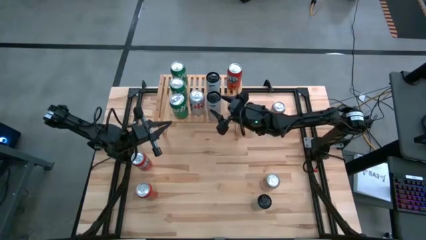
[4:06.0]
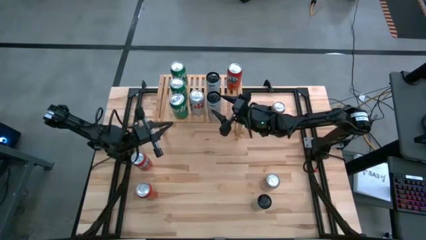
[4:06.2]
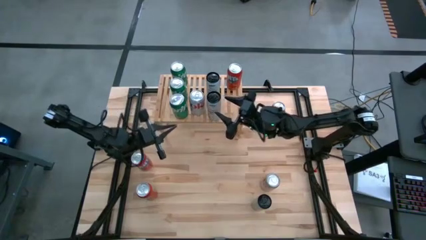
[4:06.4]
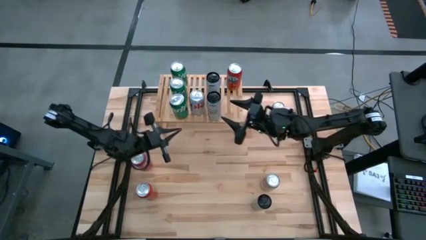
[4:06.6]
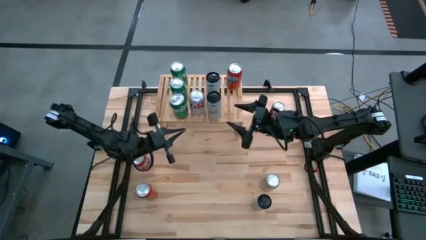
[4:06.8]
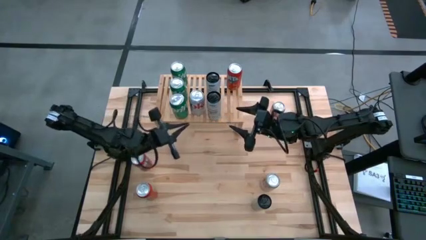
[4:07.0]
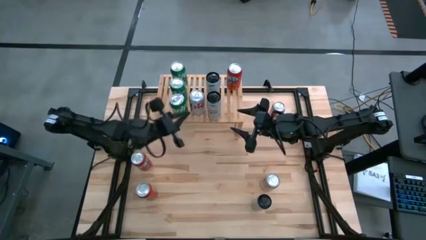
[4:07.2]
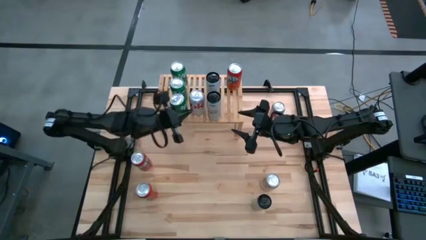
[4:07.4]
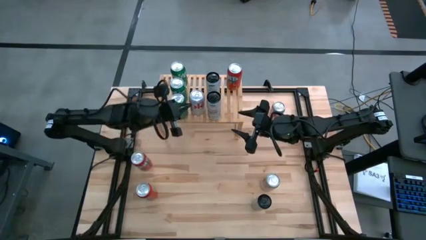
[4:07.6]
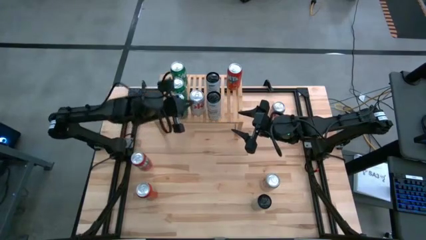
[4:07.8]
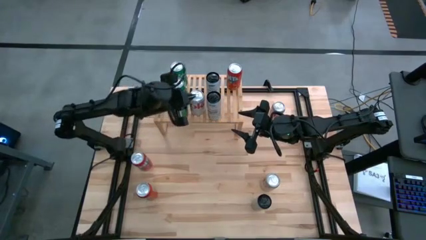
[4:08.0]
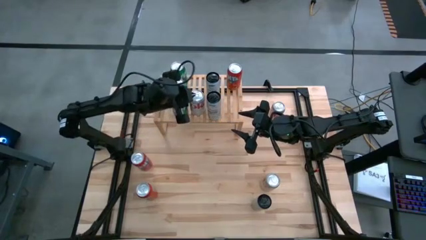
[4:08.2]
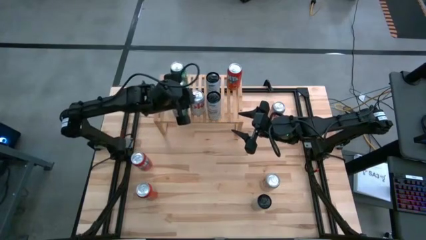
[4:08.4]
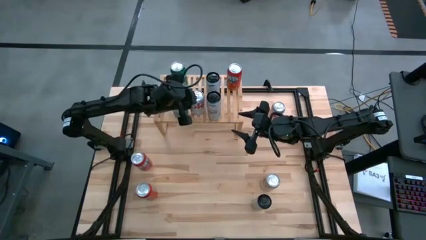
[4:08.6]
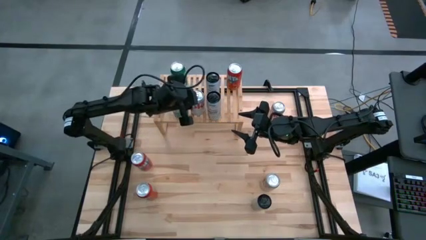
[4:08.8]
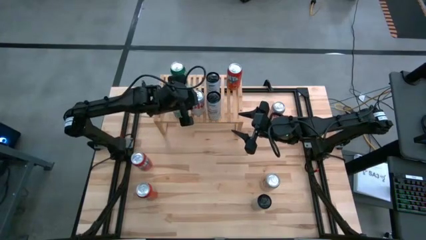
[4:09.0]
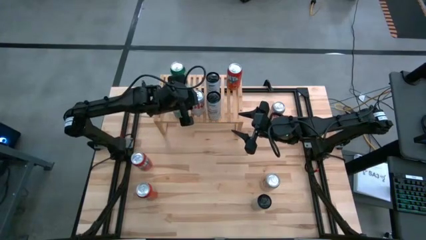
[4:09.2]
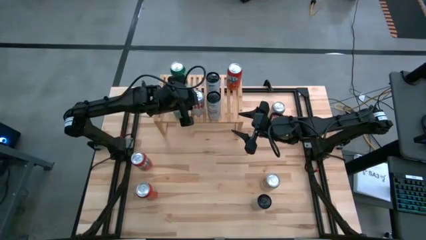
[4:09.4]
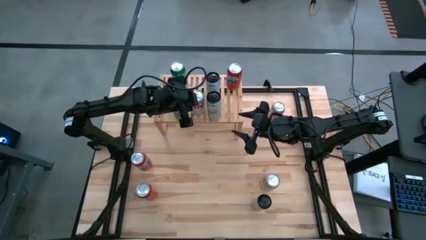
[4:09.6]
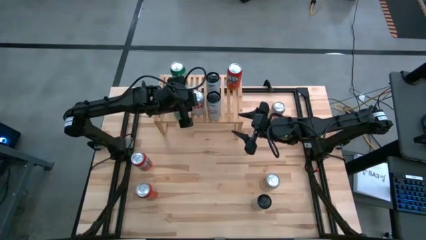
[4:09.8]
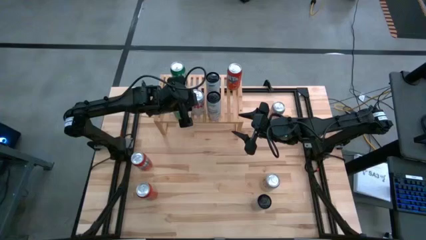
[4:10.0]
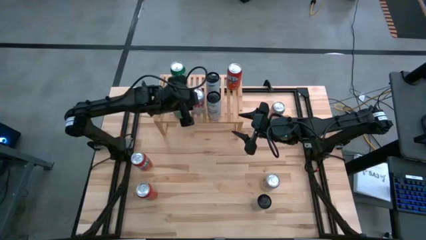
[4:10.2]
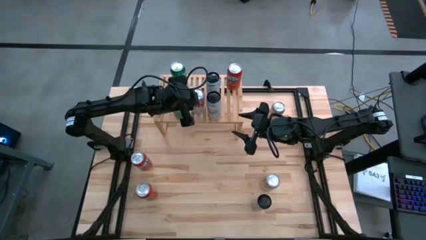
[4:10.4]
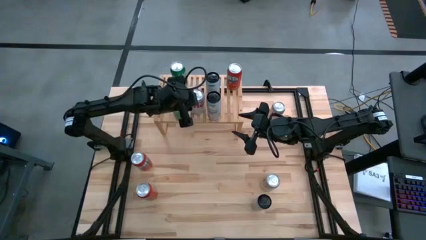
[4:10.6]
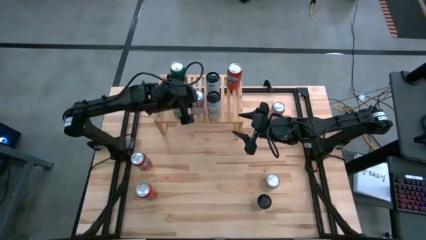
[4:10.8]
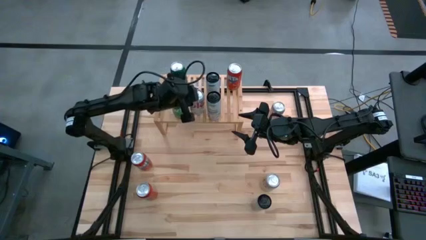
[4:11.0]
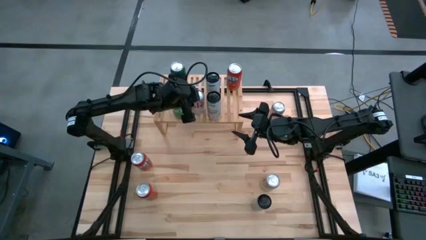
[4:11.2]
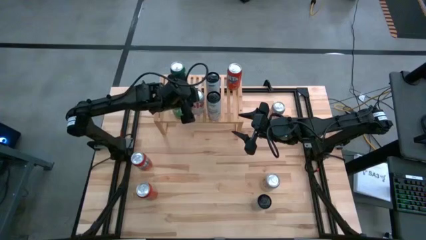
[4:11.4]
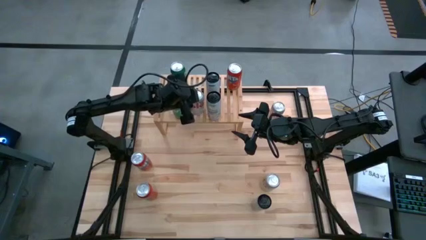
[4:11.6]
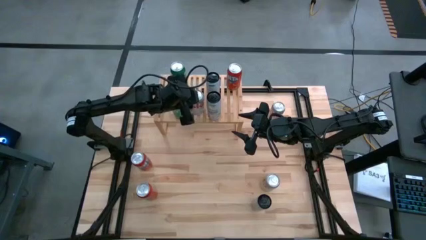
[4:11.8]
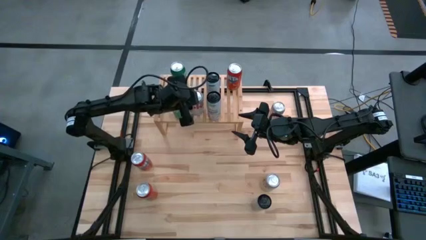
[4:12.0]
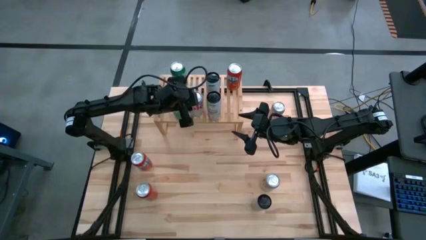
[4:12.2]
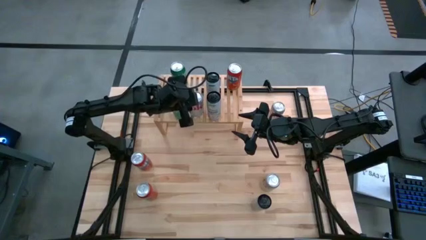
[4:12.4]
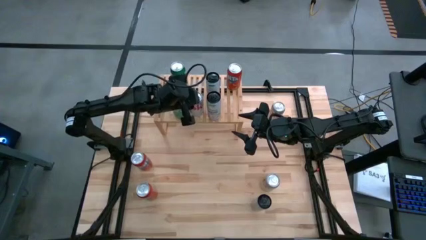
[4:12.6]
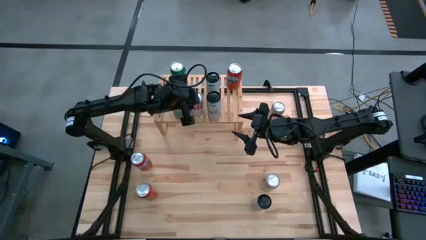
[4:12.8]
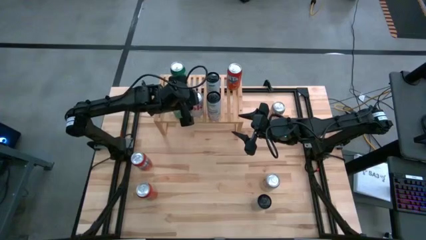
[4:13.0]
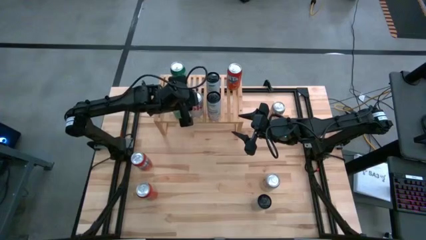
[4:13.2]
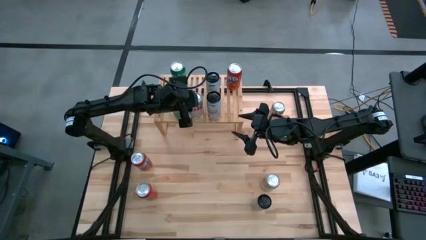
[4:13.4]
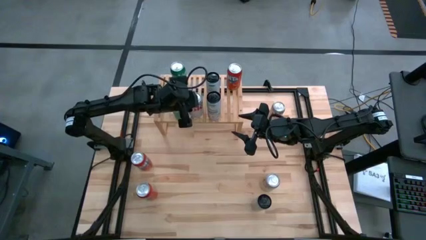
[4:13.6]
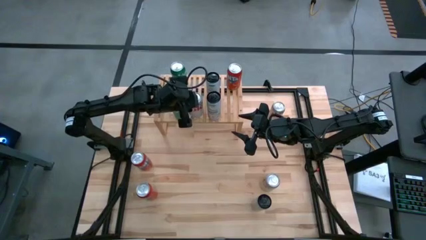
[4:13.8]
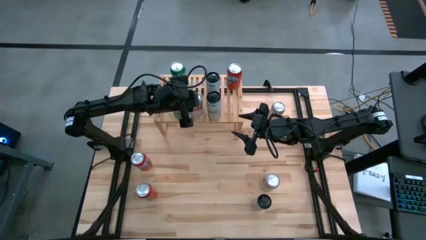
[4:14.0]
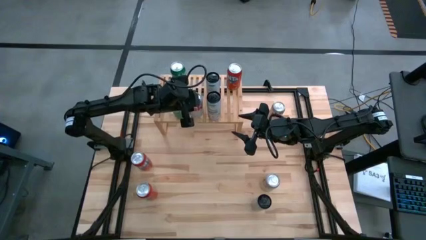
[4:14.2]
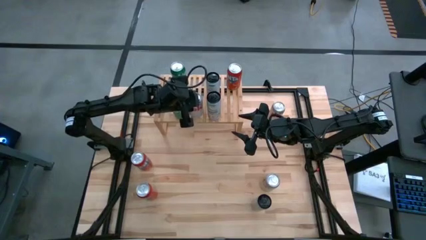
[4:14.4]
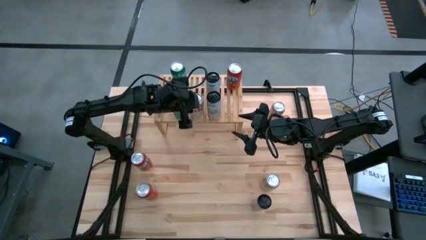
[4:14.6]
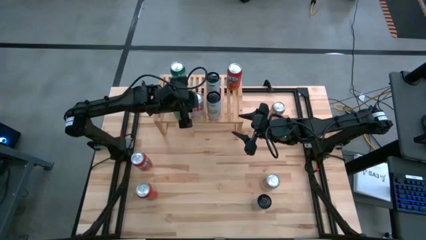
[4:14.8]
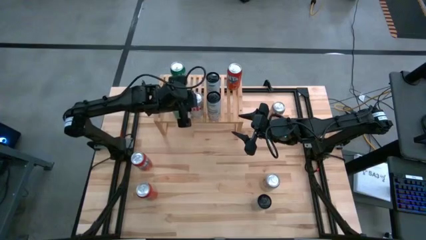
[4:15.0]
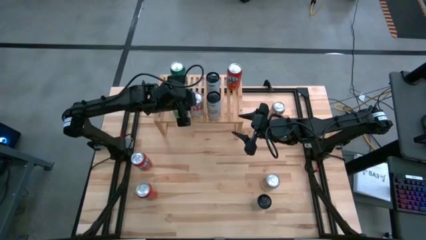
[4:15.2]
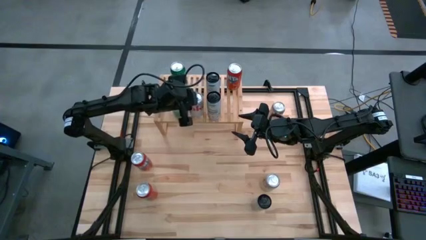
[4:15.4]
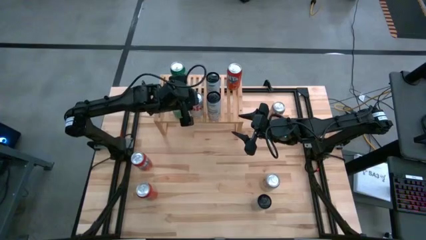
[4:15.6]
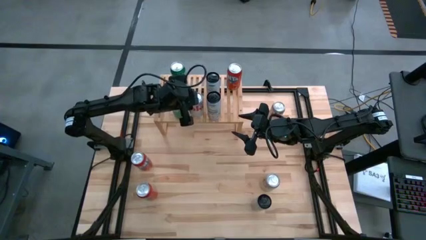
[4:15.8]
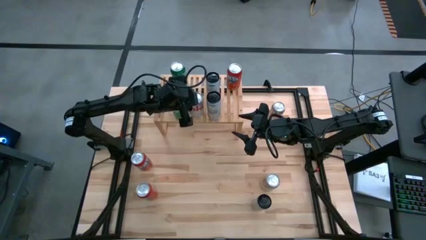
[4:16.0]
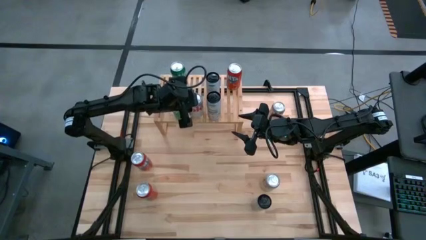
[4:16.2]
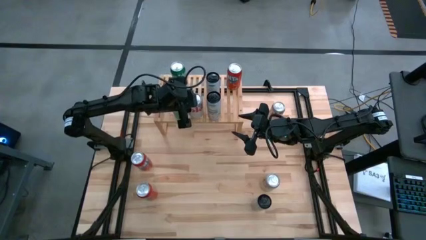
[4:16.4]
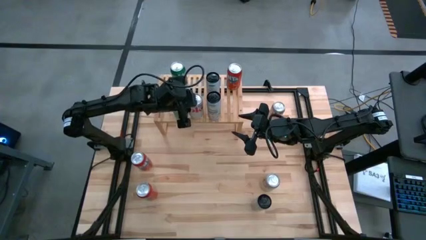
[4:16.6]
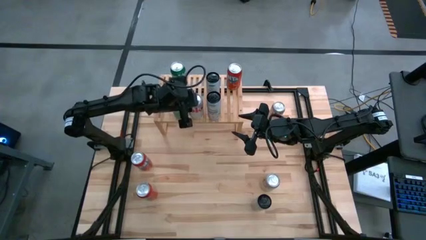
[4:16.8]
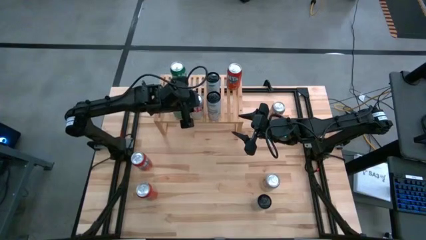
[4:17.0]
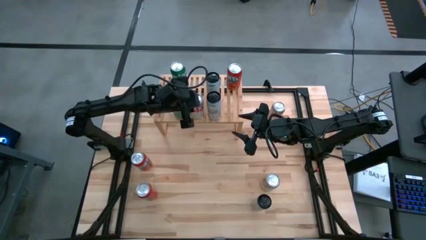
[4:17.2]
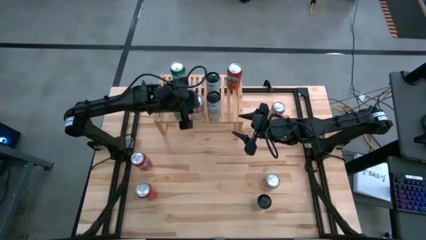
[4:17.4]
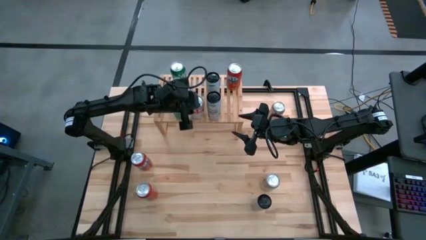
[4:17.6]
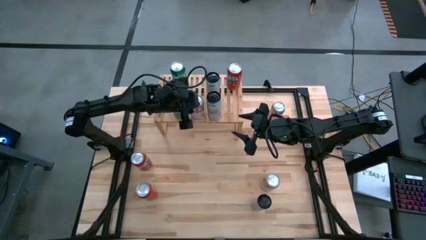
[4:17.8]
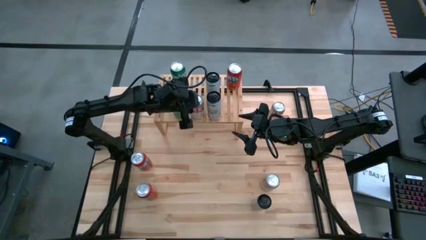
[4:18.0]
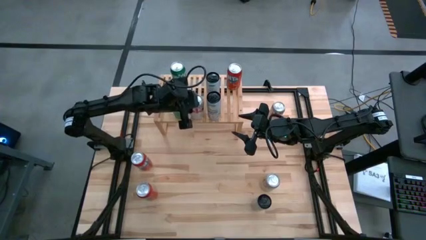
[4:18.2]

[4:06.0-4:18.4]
Task: Place canned beverage on shelf
Adjust the white soda can

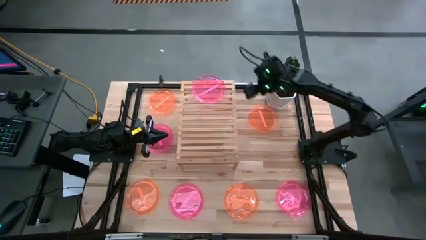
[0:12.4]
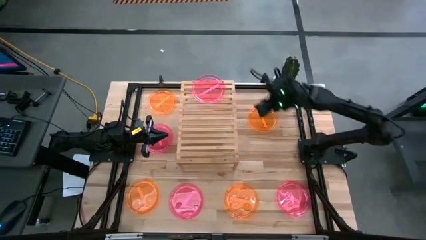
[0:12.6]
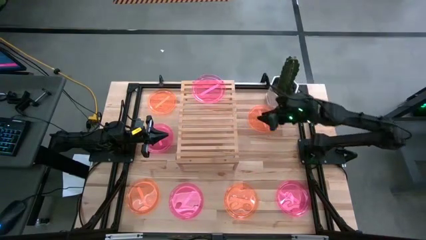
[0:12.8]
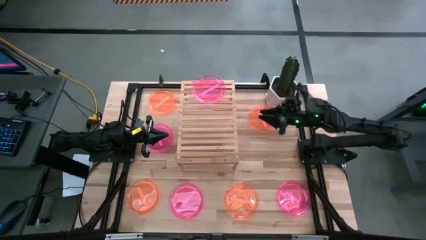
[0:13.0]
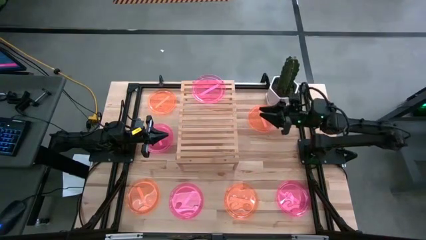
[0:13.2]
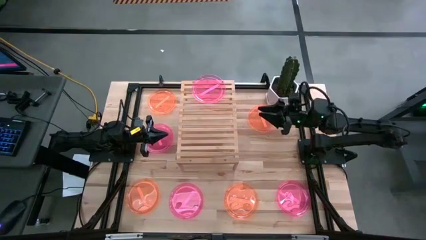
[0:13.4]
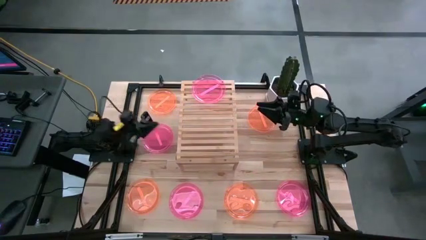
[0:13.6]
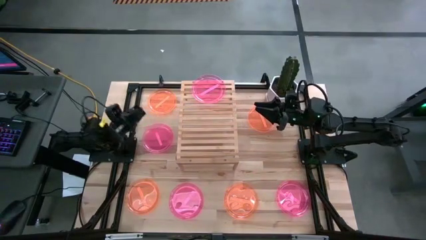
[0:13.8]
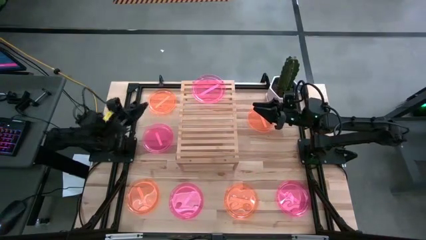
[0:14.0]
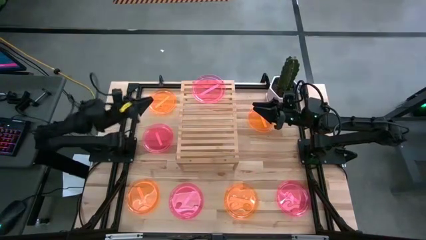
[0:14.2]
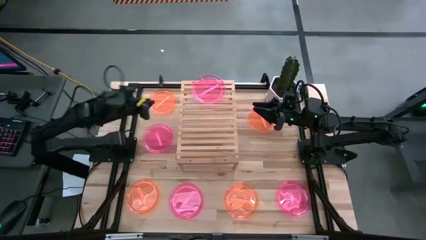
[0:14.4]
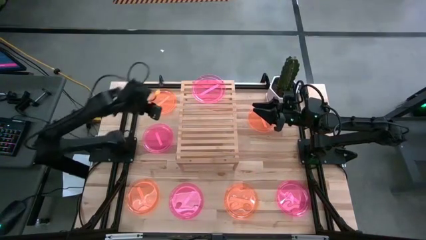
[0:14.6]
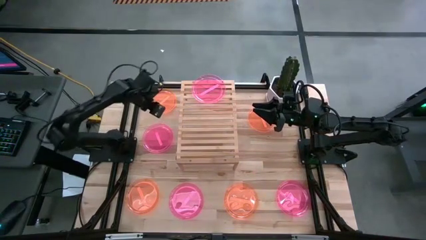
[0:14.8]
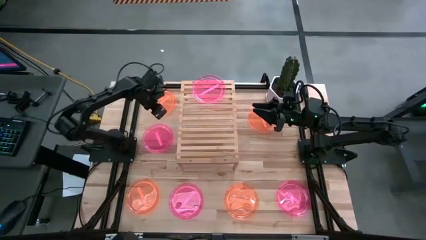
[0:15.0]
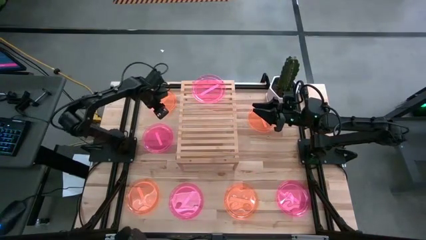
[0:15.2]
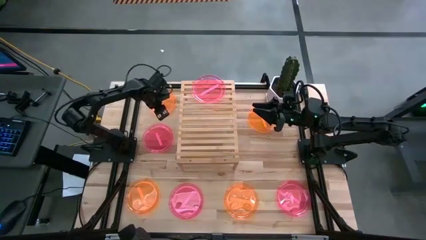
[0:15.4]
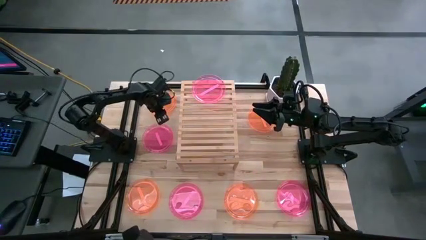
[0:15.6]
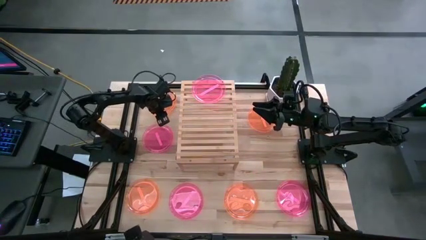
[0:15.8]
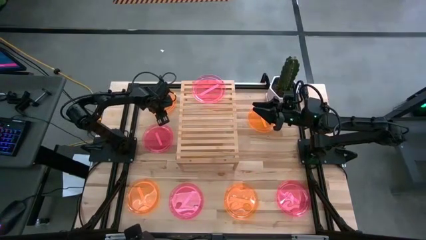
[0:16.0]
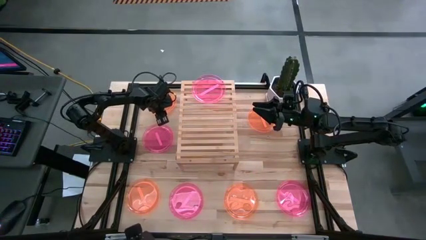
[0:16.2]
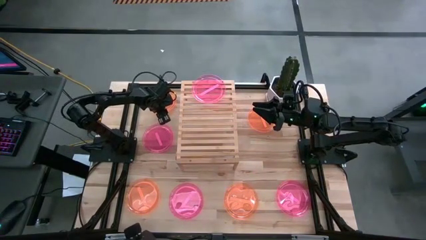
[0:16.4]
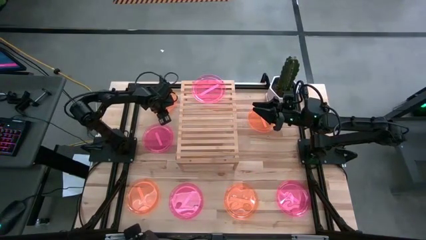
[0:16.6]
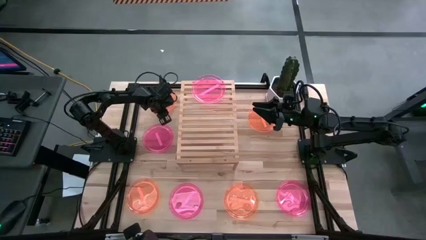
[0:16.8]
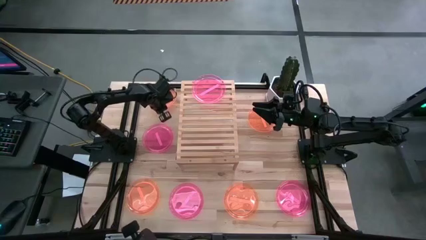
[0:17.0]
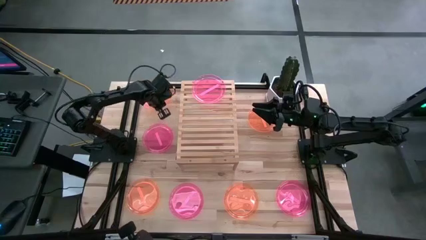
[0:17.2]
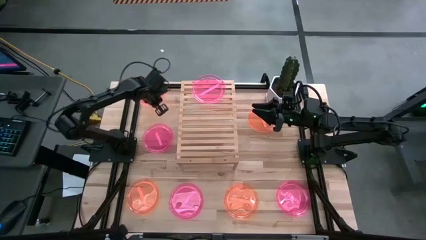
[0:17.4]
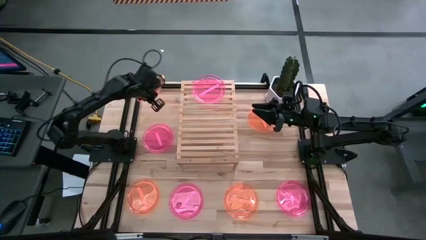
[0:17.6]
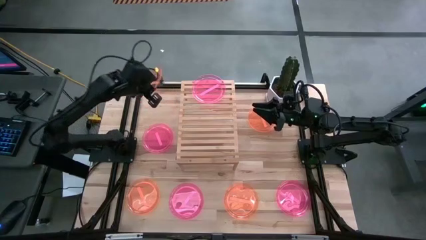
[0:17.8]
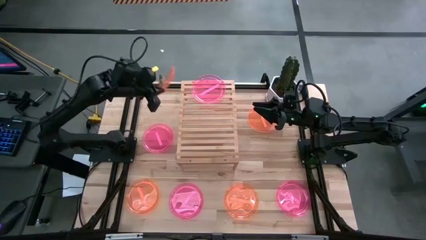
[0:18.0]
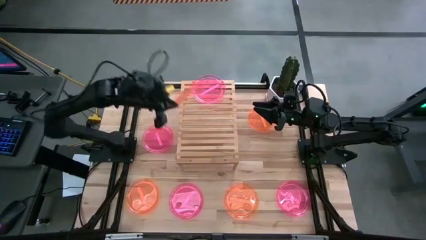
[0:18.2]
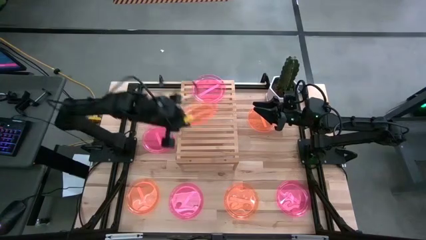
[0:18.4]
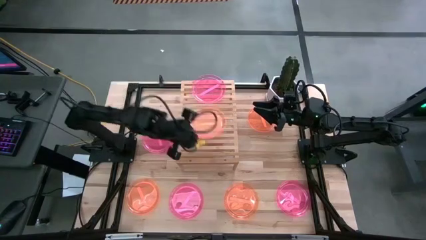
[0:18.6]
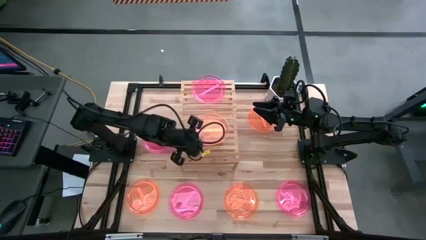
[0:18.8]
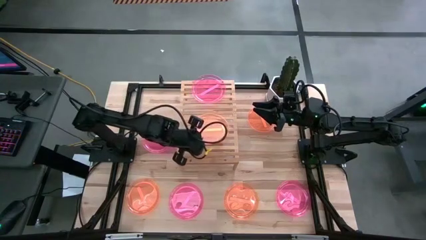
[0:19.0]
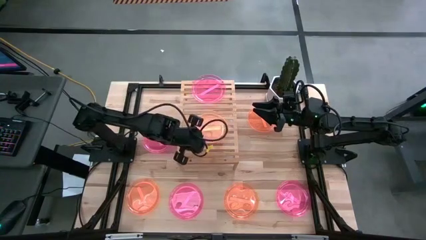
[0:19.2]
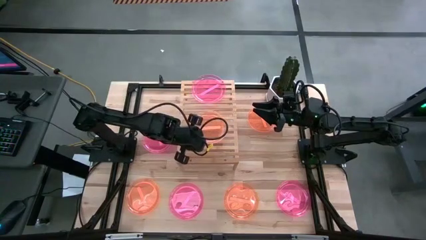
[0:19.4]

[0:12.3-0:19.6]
Task: Place and stack plates onto a shelf
Put the orange plate on the shelf
